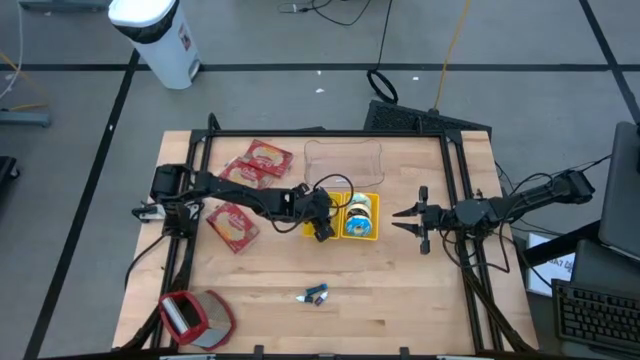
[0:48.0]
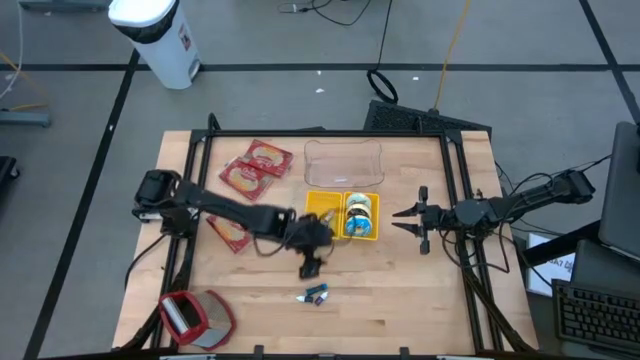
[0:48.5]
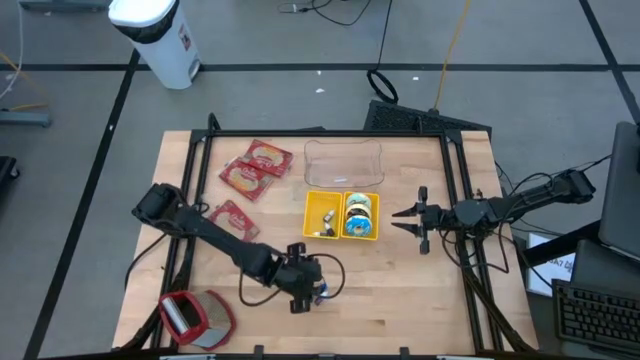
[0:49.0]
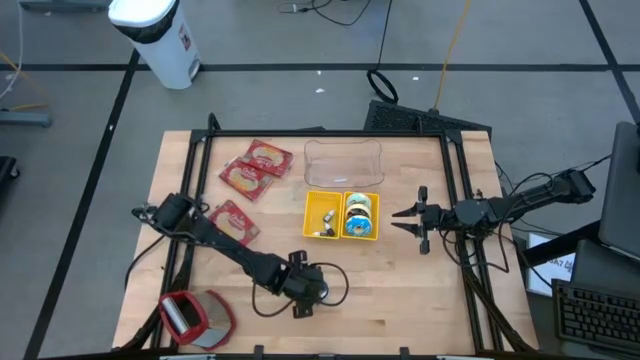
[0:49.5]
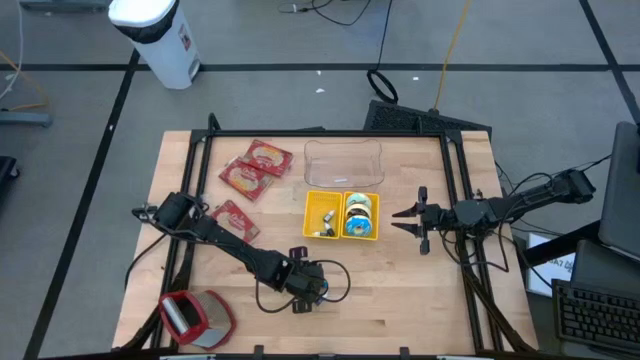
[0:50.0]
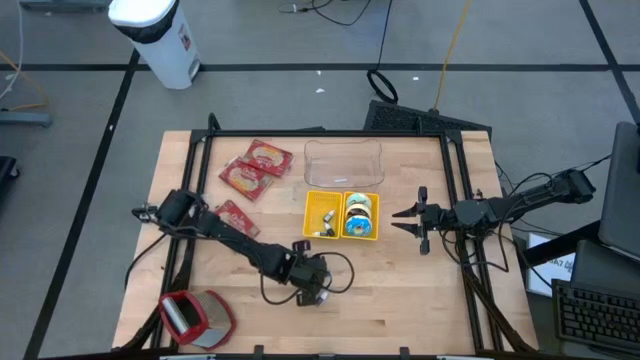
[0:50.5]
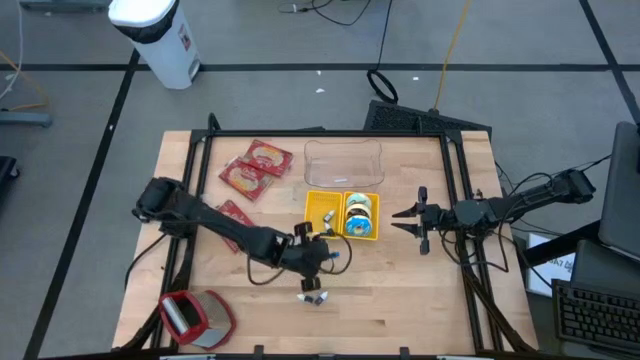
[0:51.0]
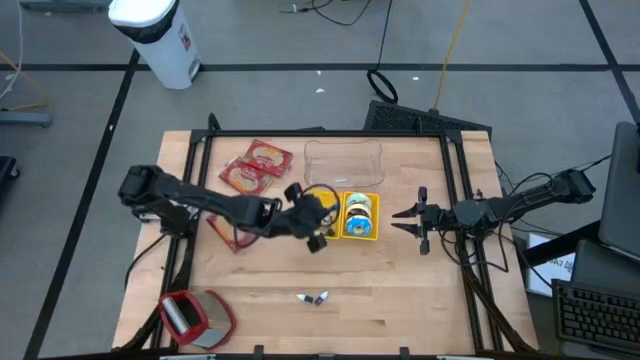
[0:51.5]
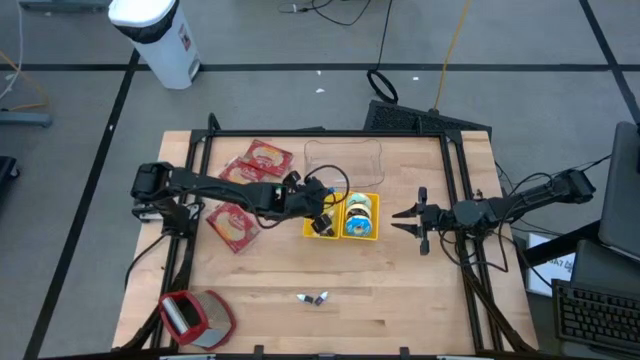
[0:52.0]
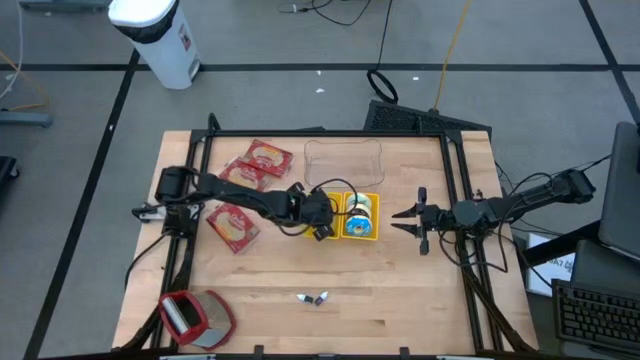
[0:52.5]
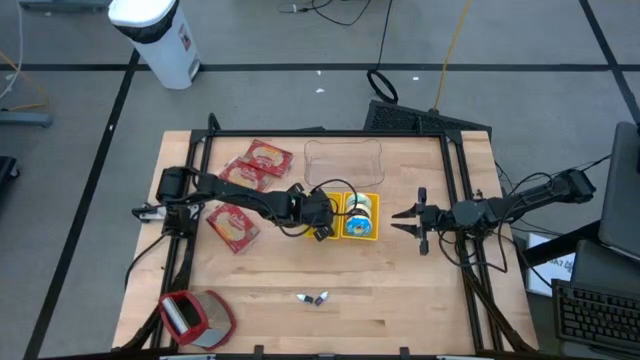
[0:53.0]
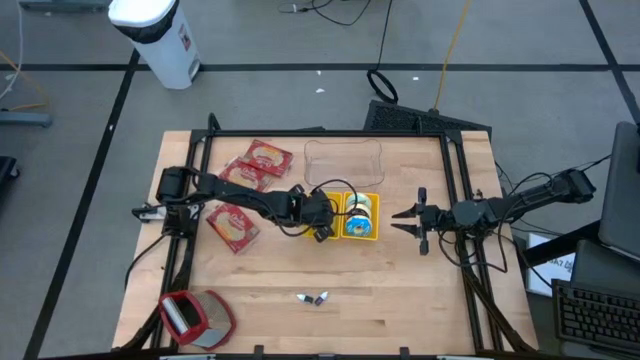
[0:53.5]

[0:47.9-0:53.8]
Put the blue food coloring bottle into the left yellow bin

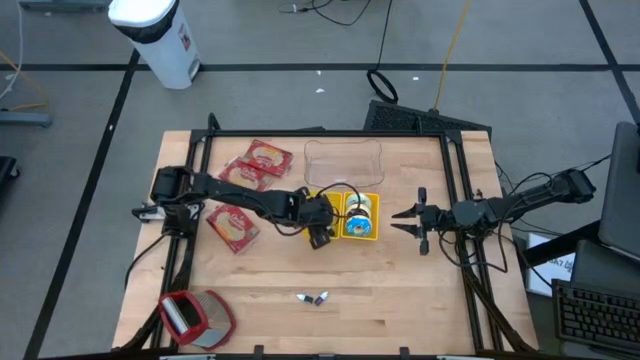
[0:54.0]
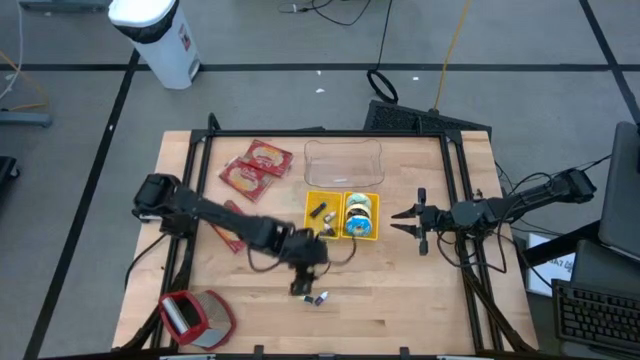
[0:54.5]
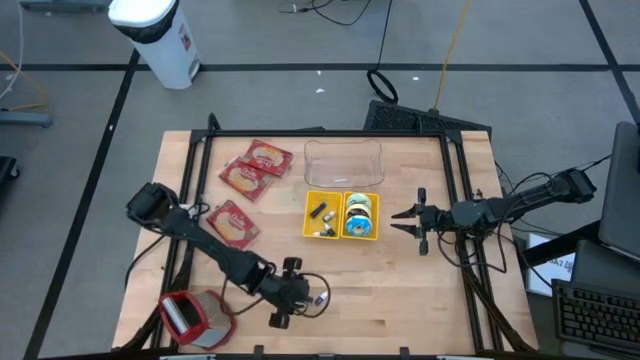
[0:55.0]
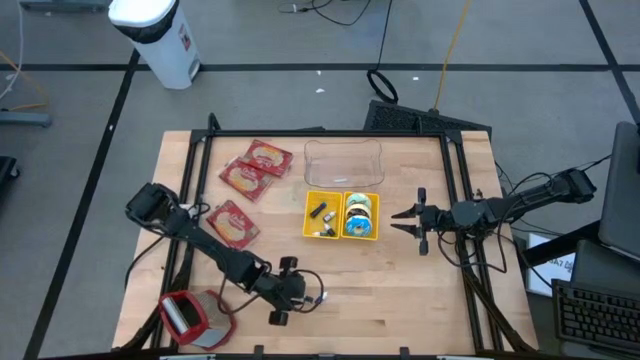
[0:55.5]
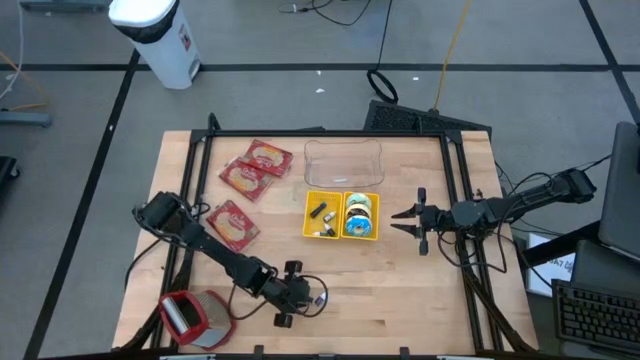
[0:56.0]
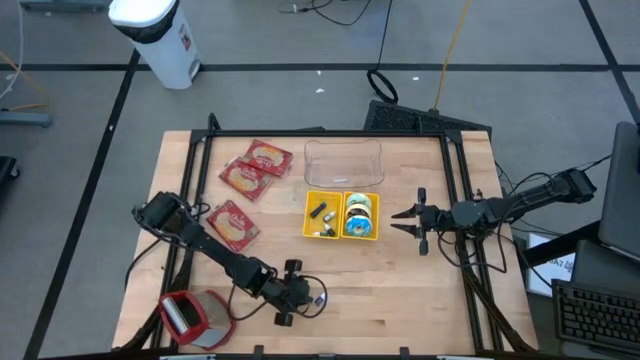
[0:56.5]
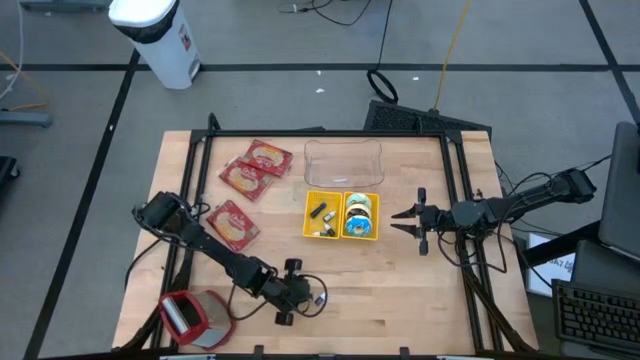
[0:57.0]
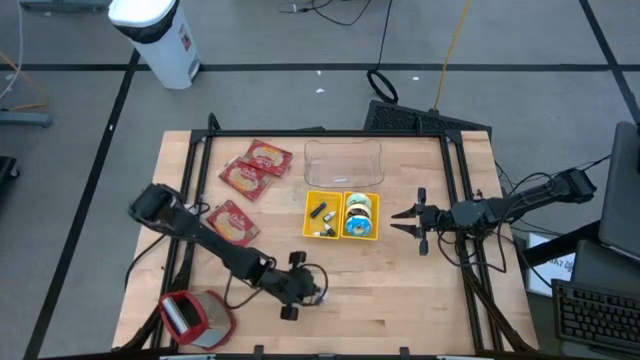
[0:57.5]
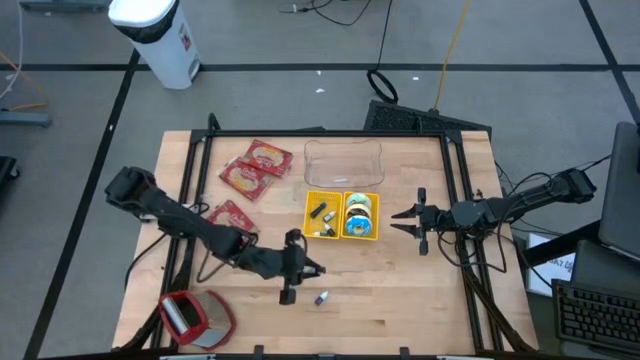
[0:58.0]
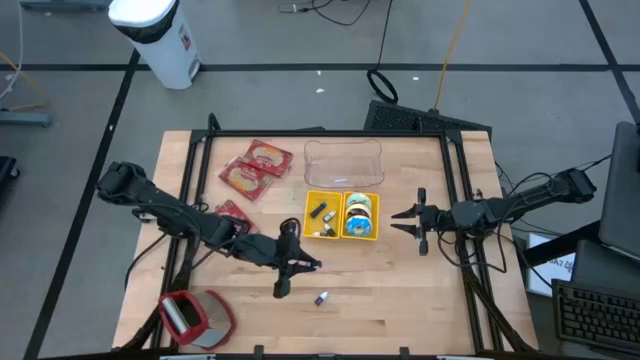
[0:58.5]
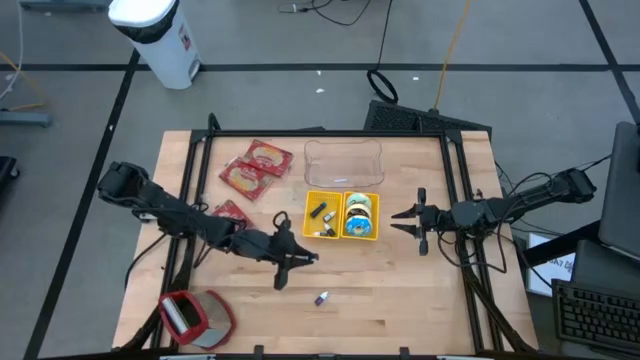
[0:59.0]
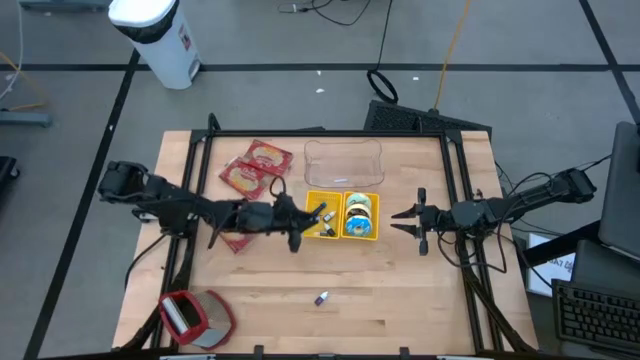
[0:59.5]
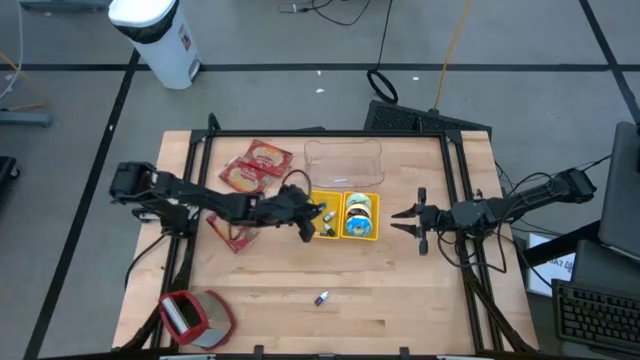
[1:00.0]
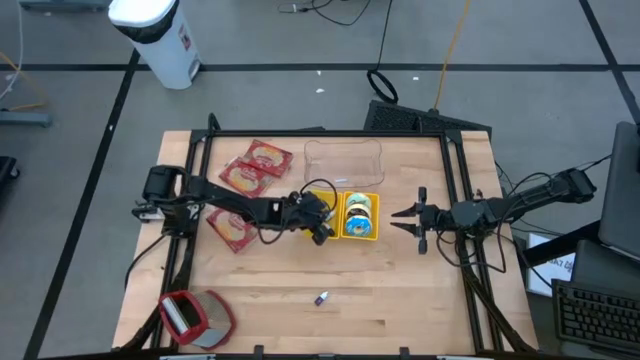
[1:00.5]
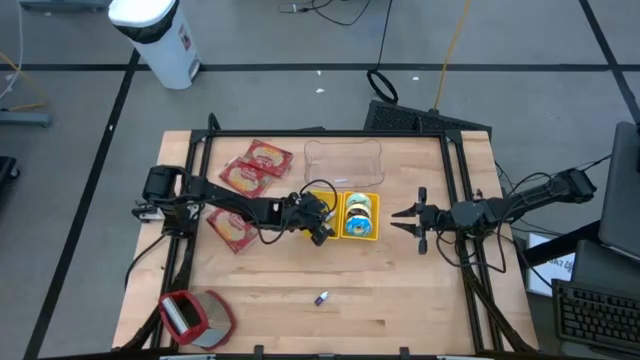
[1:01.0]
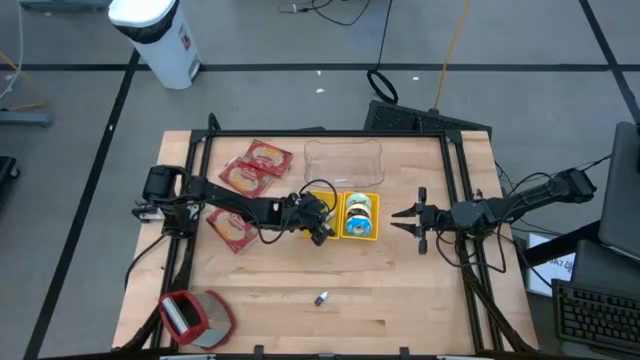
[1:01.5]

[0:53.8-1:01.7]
Put the black food coloring bottle into the left yellow bin

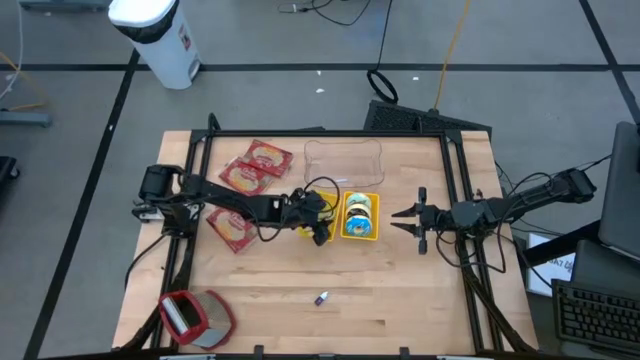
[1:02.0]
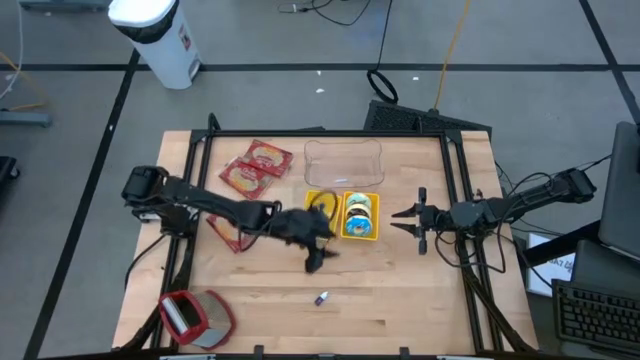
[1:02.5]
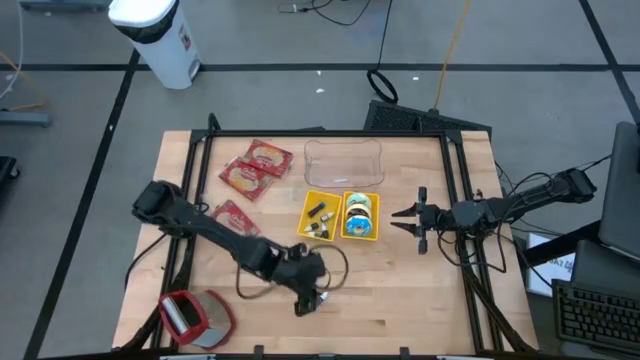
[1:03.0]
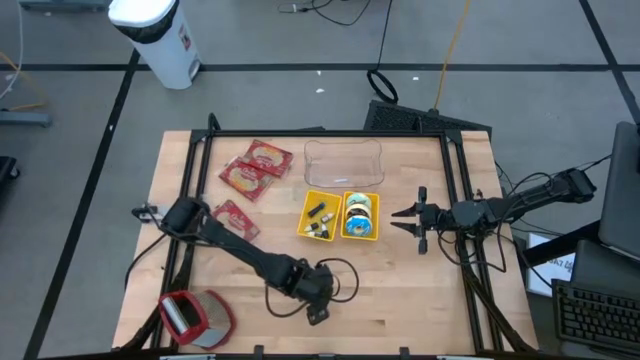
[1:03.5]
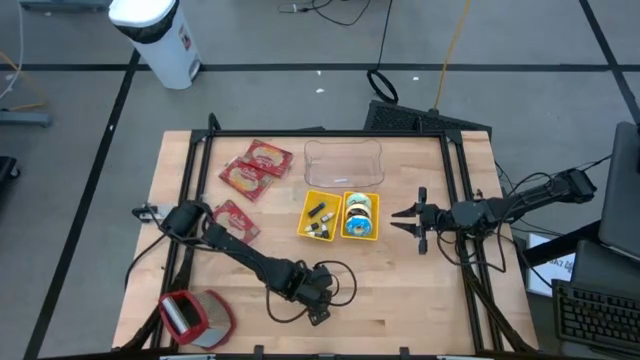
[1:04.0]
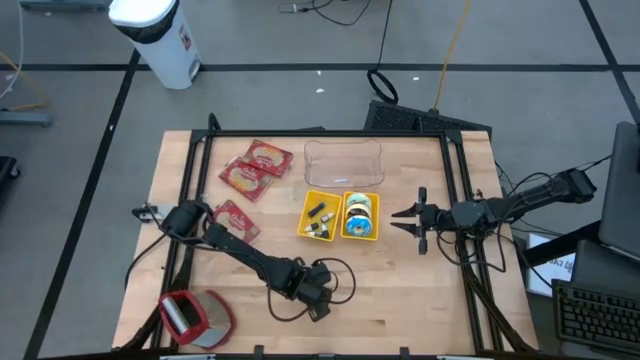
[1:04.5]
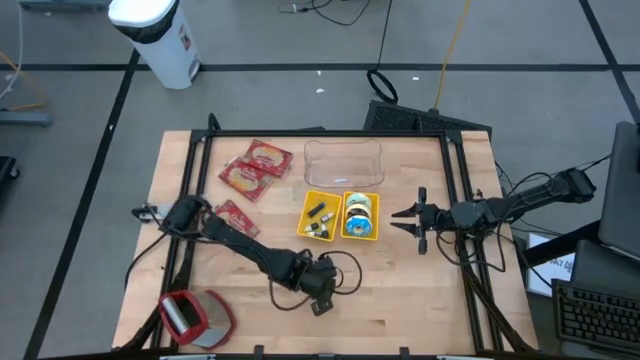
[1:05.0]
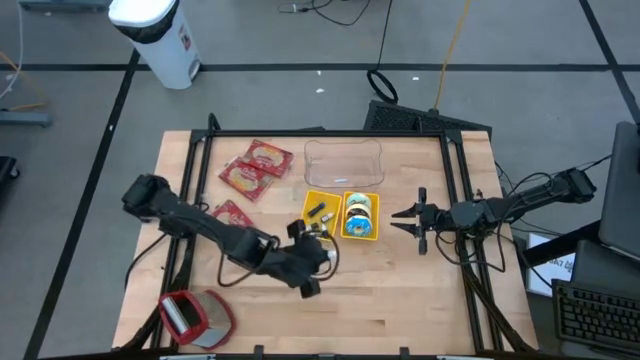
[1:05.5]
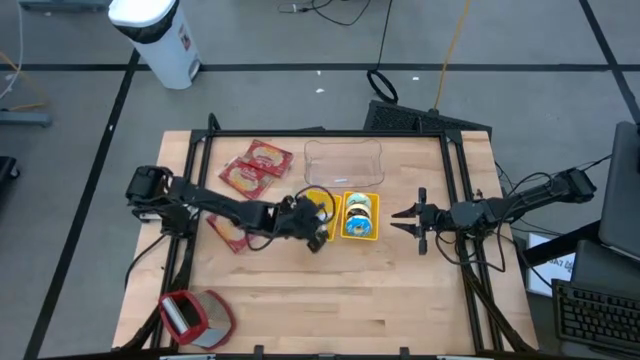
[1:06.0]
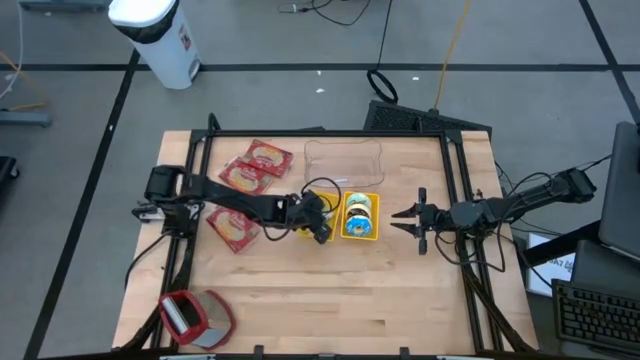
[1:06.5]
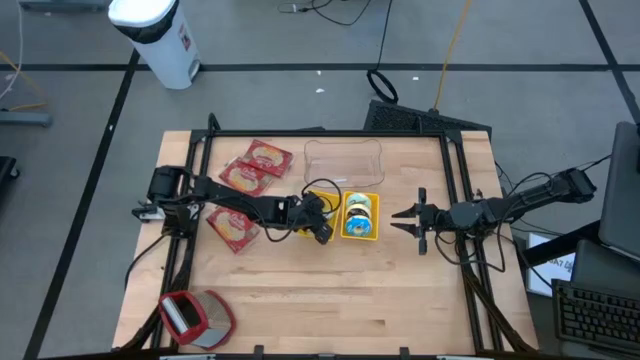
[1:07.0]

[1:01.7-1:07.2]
Put the purple food coloring bottle into the left yellow bin
